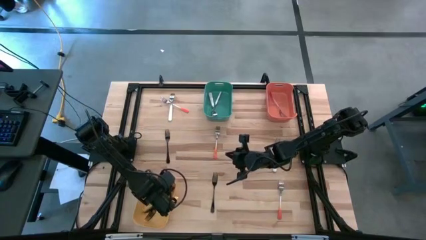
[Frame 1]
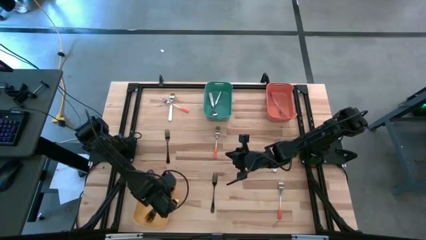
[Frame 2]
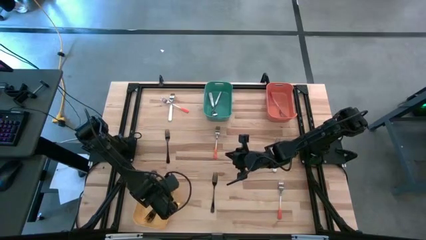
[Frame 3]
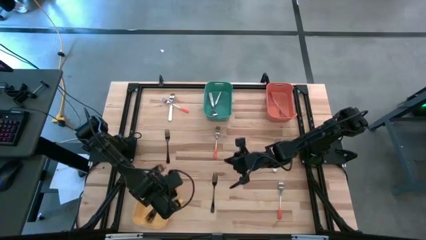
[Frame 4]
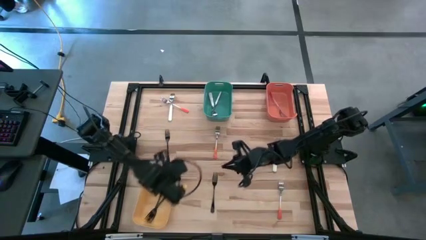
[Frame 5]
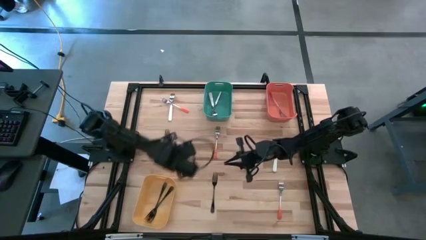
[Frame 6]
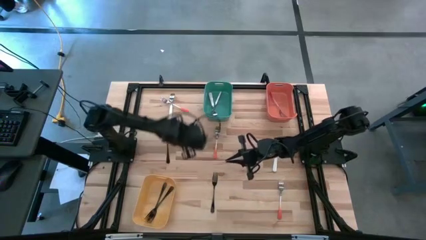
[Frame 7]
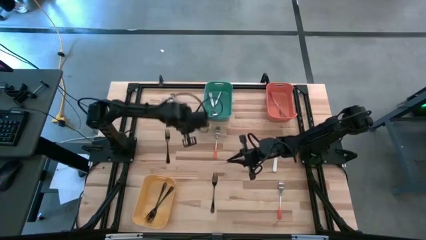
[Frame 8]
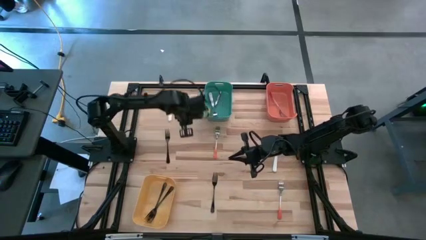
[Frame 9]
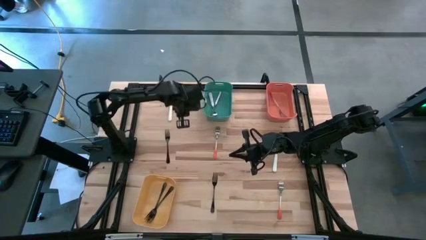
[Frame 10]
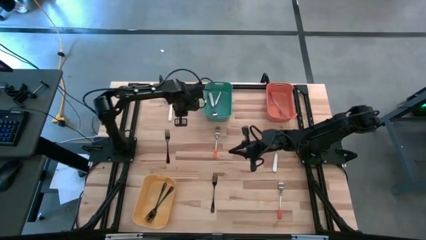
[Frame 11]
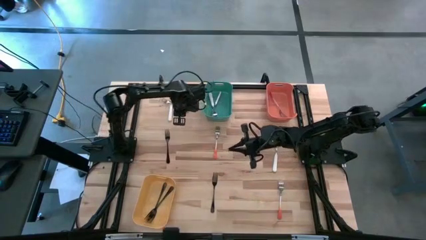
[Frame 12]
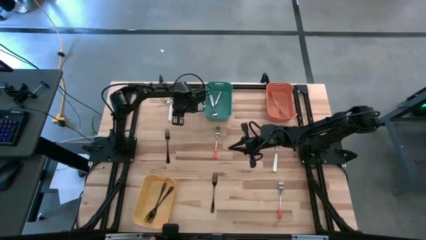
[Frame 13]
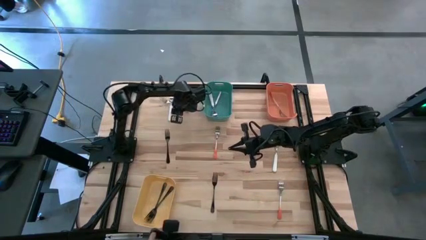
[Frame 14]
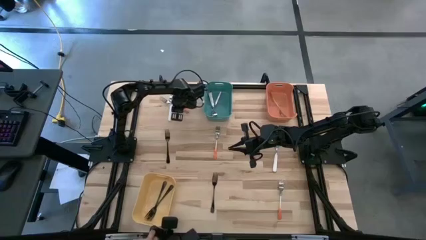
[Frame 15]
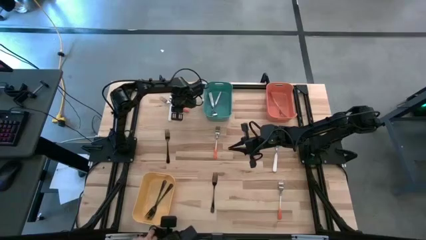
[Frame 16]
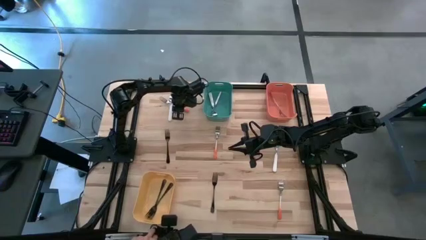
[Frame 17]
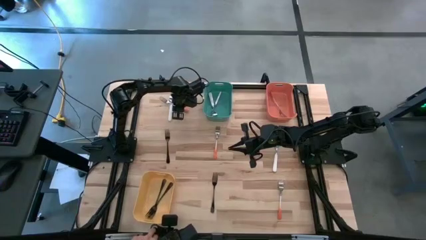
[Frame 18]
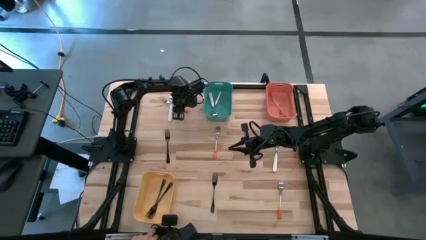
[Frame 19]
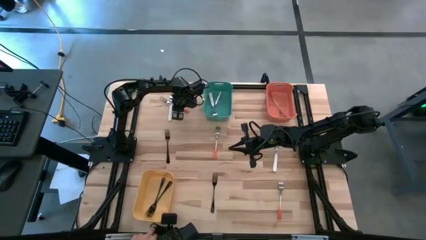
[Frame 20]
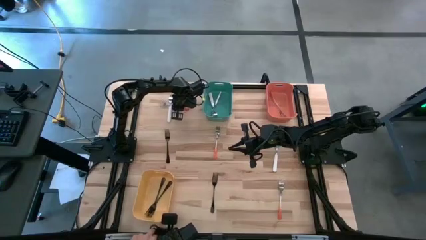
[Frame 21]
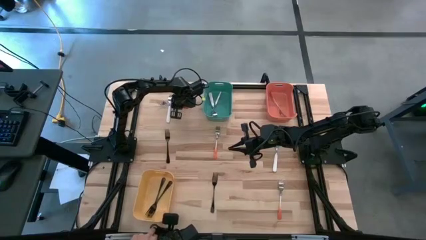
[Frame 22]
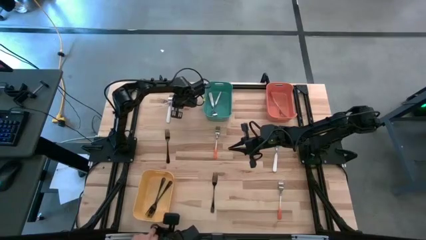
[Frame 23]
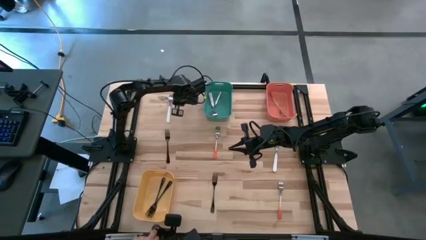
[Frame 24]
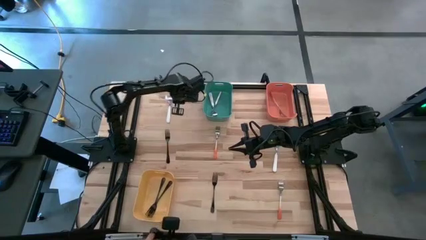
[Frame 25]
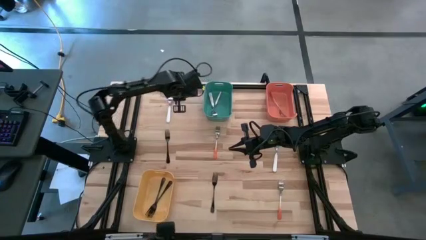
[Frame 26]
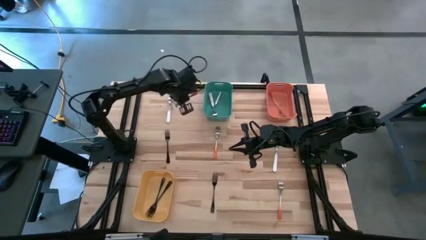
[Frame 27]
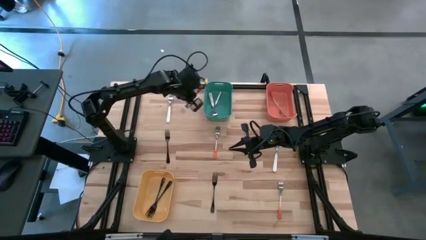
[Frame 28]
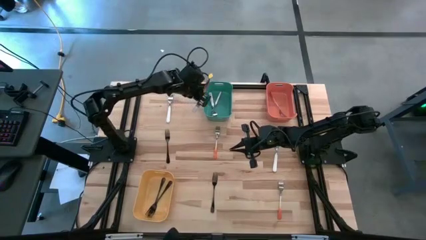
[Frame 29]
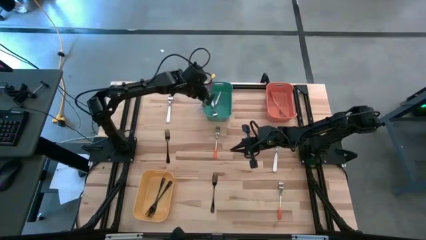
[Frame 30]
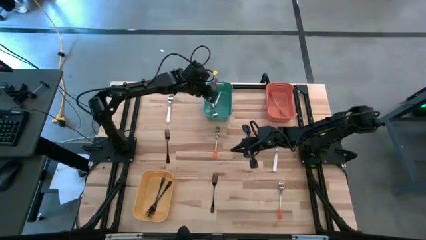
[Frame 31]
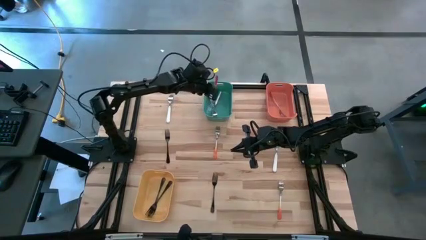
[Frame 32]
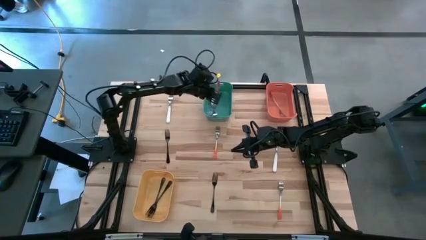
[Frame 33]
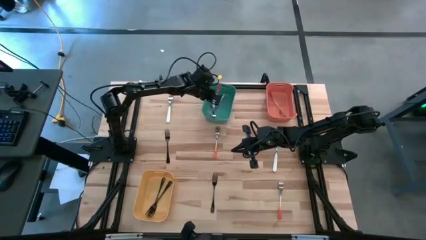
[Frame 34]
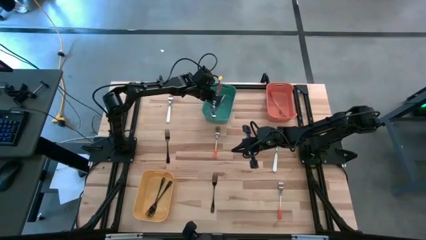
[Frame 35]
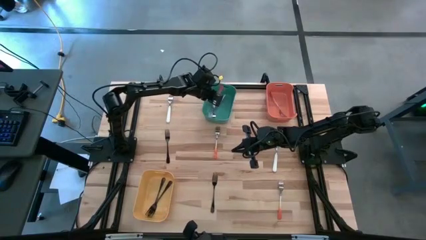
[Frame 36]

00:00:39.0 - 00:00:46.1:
Task: Sort silverware by color (type)
Put the orange fork into the orange bin

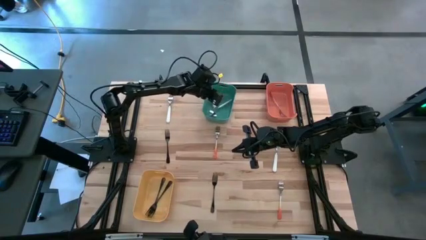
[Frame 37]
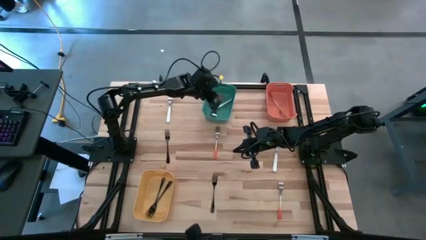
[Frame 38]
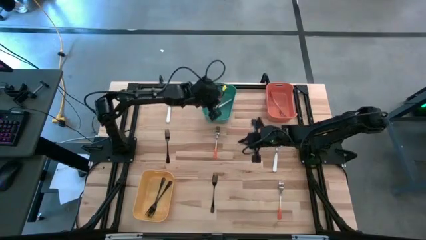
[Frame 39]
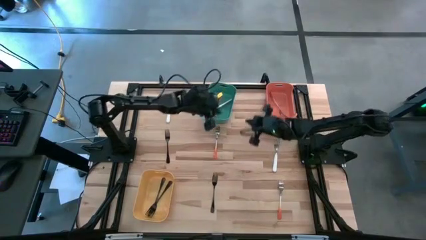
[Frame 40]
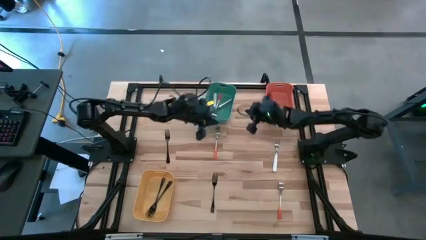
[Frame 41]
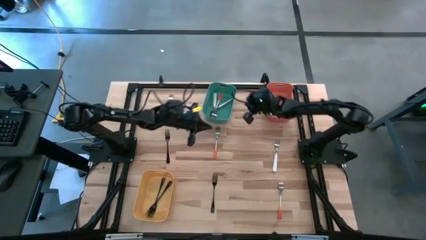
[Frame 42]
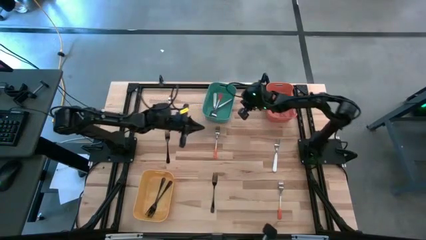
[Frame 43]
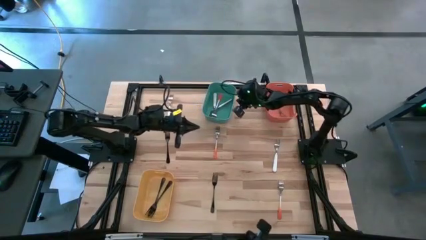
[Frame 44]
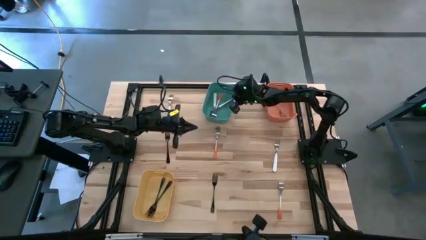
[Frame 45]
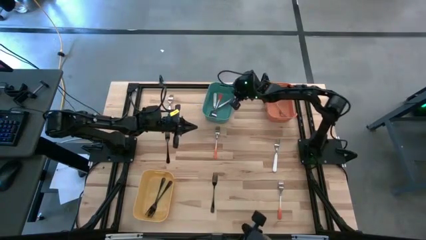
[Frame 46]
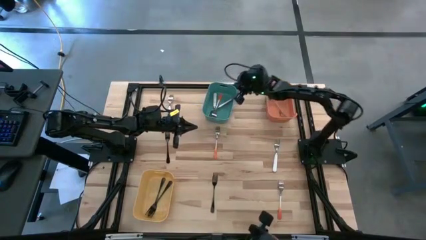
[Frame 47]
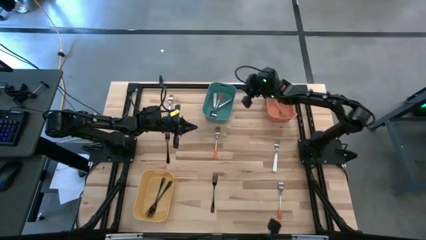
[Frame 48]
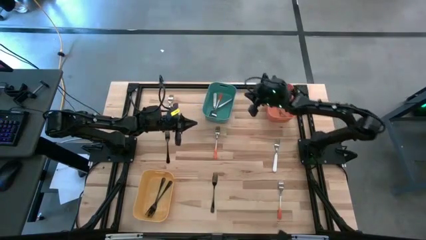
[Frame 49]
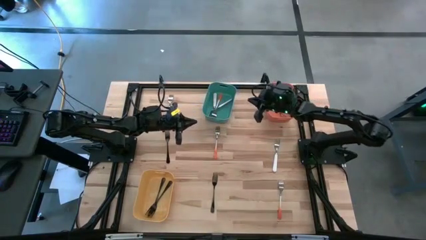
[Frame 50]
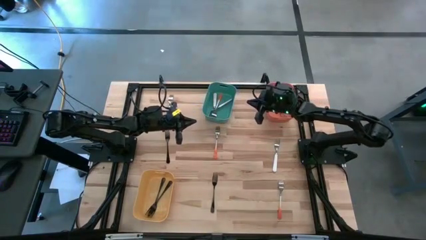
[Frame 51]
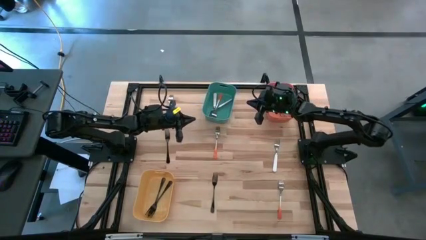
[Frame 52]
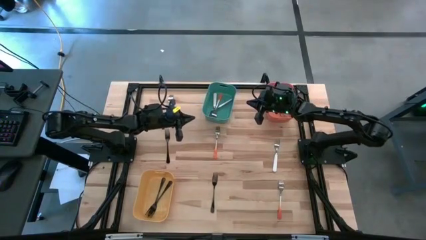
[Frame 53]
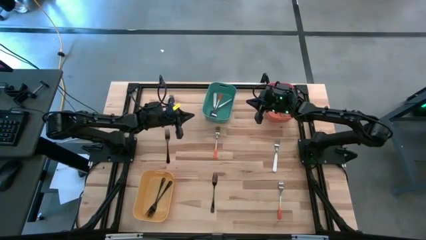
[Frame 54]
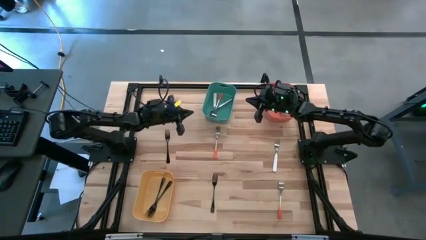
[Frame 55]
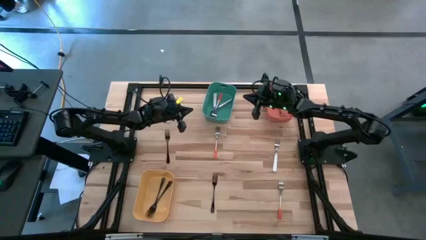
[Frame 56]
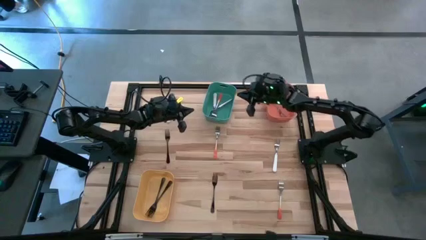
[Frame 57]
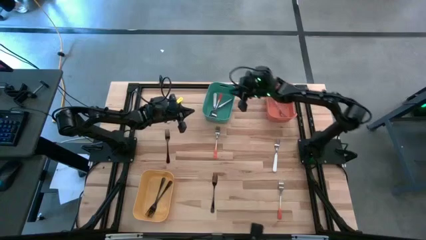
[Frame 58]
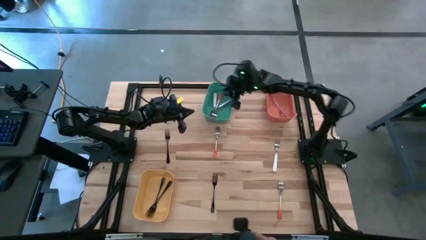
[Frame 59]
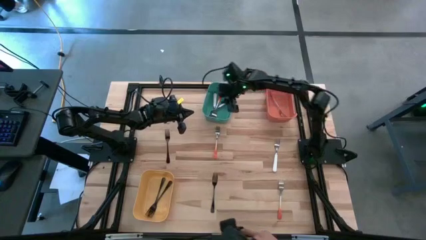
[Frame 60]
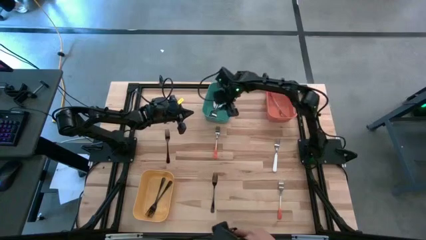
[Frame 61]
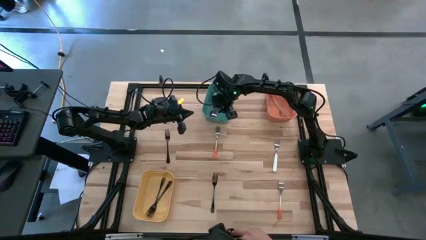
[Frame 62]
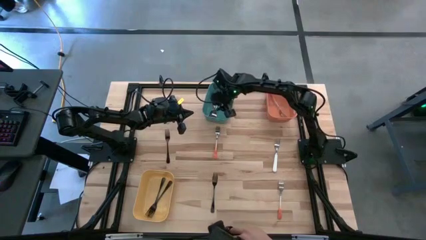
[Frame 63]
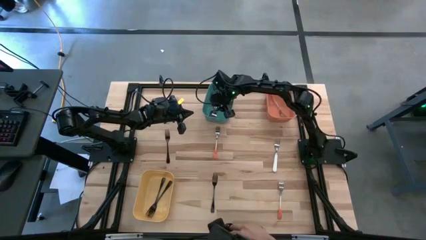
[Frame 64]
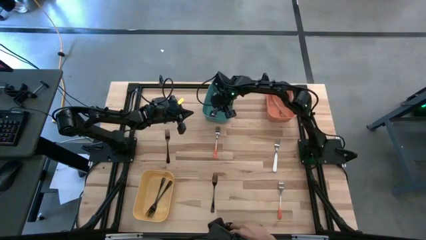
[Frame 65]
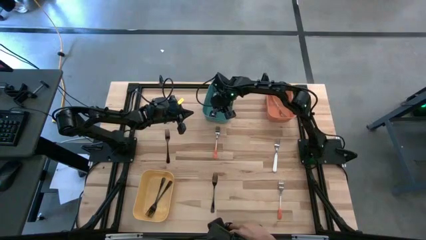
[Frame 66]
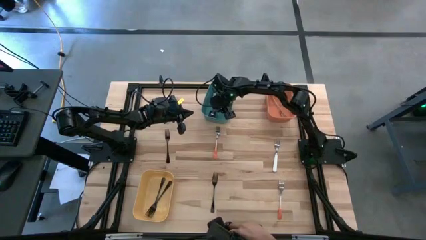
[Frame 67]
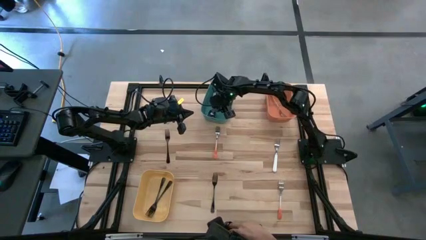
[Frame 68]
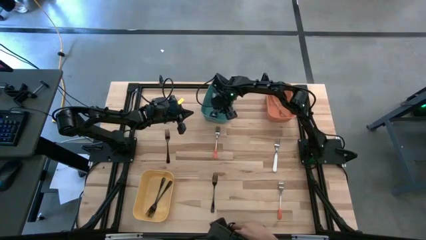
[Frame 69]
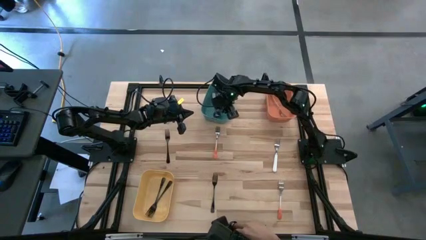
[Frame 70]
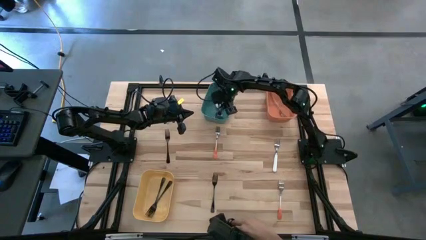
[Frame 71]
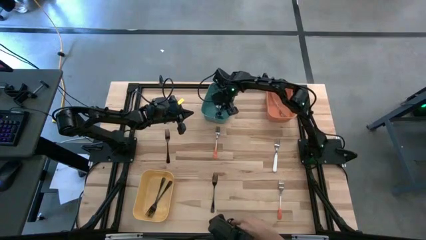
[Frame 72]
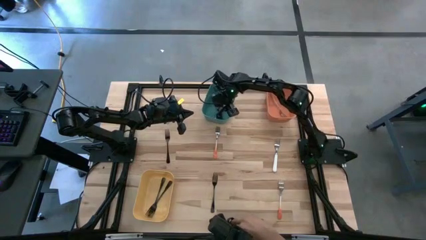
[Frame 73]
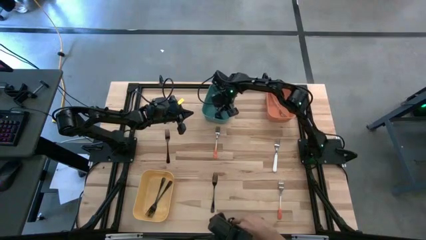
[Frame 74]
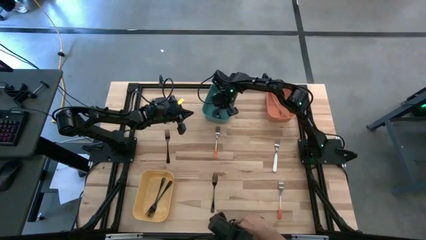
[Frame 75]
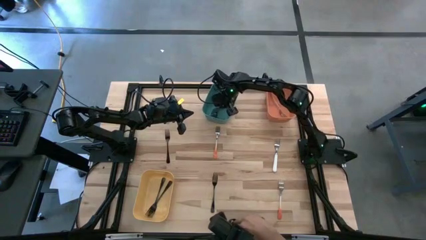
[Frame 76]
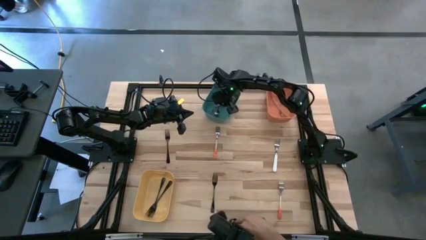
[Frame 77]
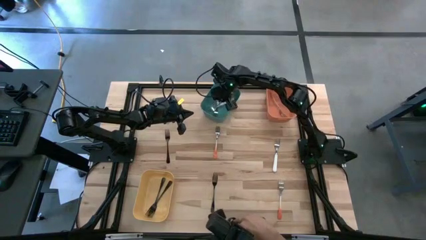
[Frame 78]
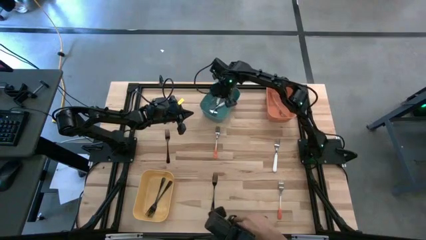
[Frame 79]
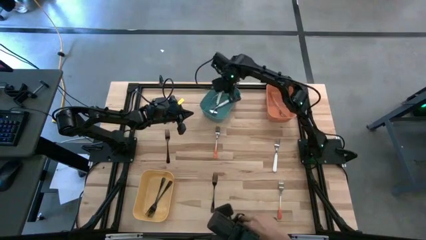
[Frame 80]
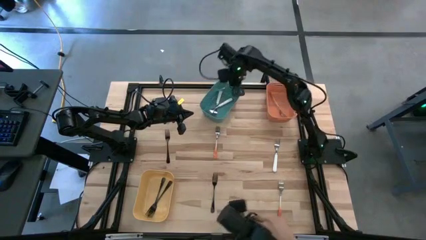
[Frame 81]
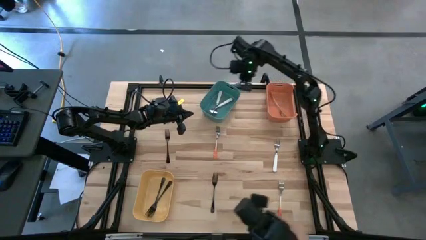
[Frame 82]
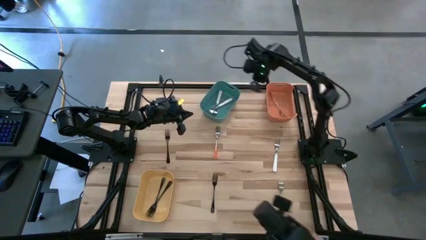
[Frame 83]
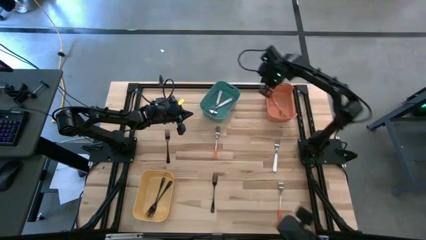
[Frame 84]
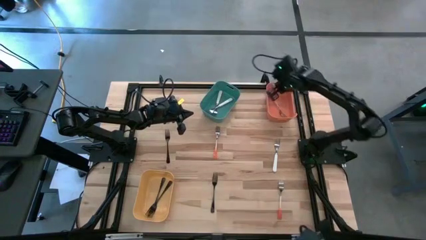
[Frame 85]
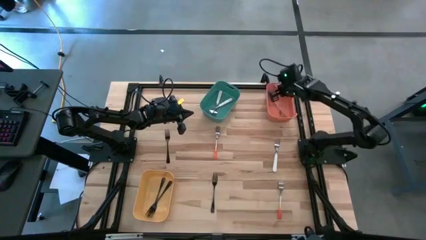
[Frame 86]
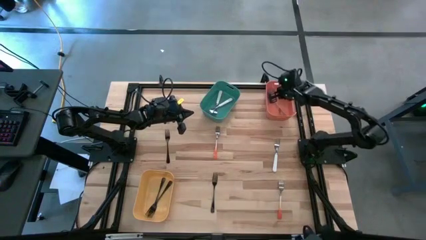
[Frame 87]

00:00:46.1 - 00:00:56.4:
Put the orange fork into the orange bin

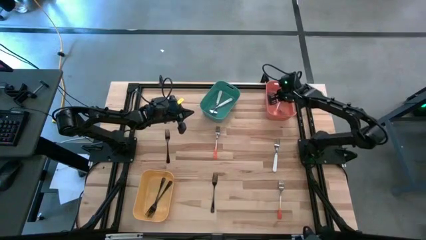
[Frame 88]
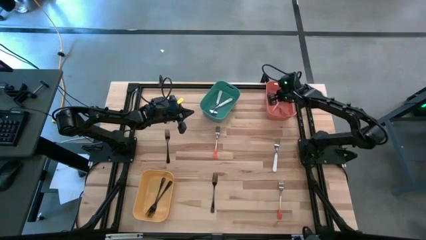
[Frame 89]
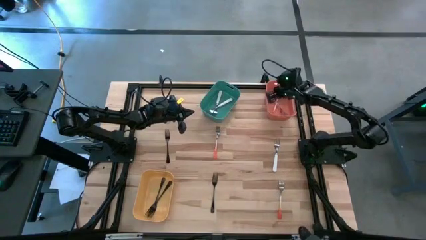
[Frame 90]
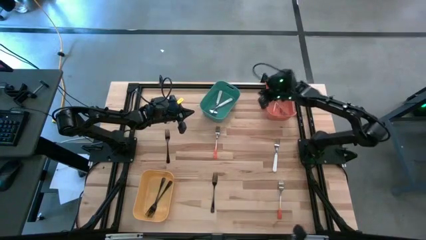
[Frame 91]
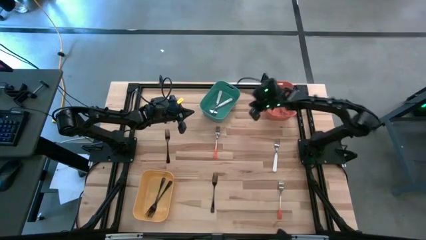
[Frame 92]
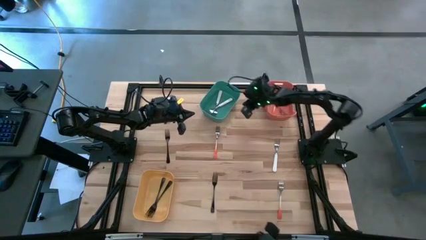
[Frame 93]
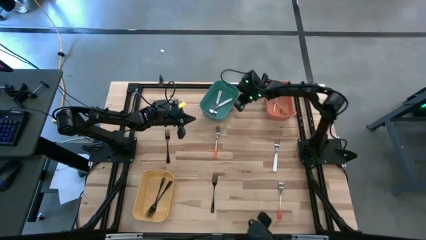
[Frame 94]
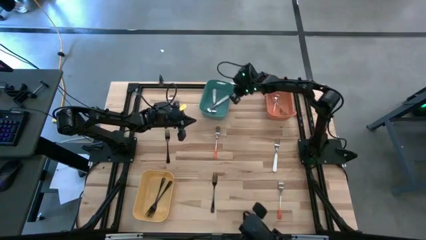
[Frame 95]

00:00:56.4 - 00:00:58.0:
Adjust the green bin
